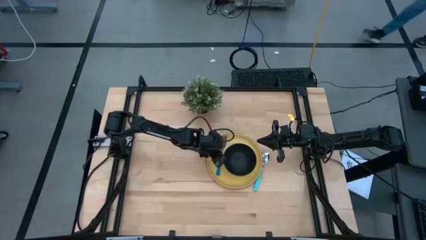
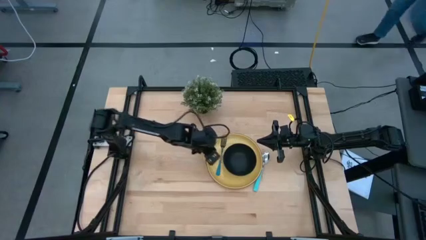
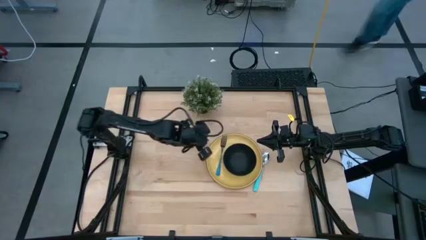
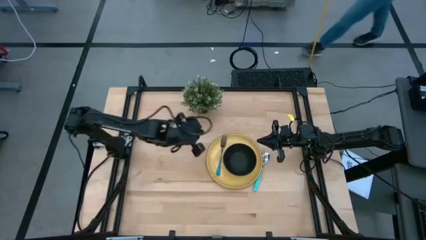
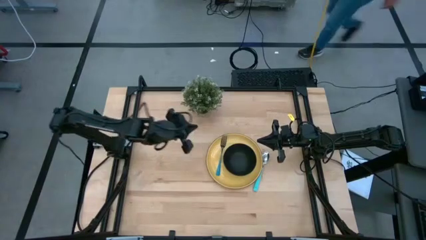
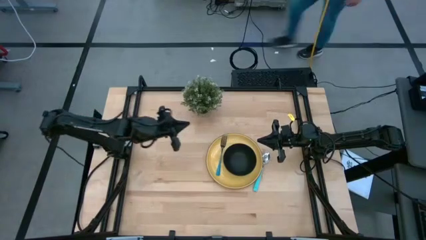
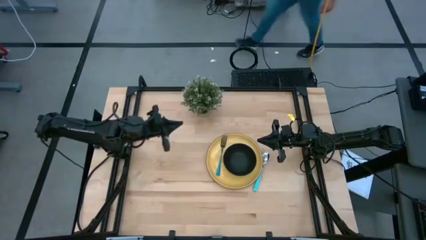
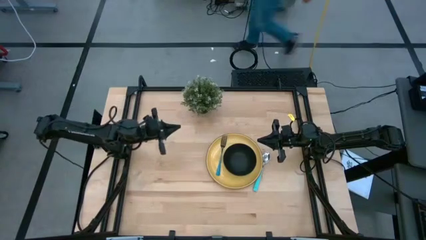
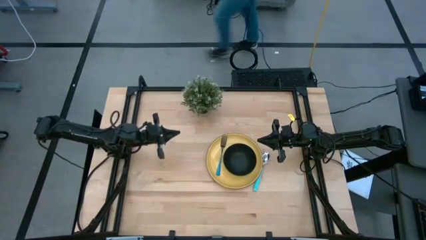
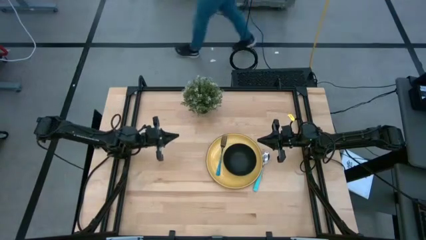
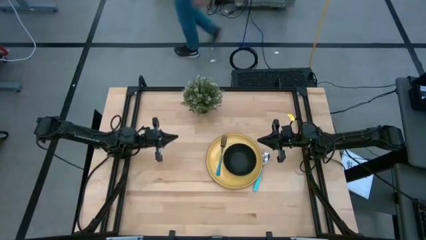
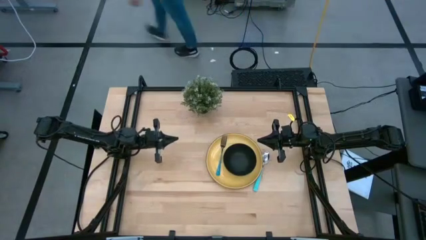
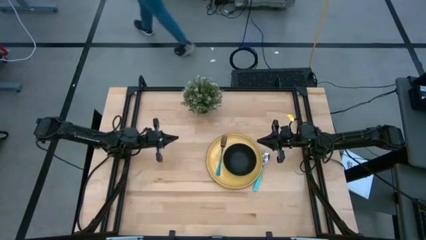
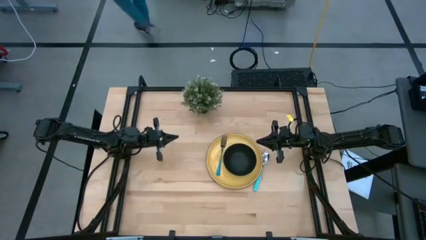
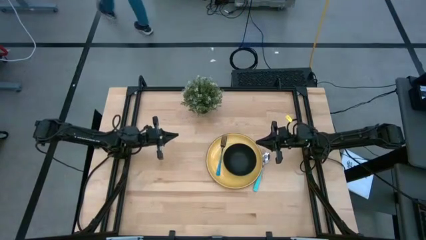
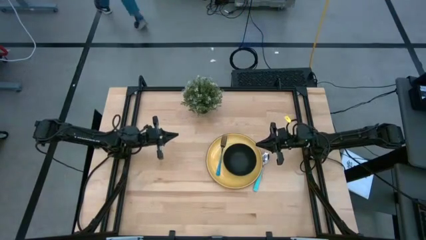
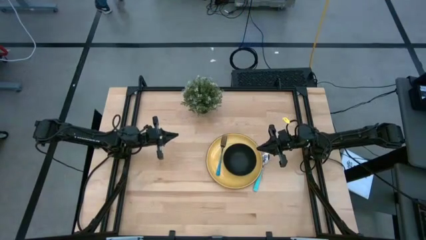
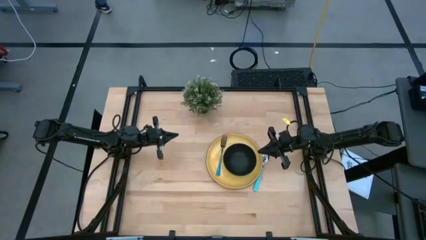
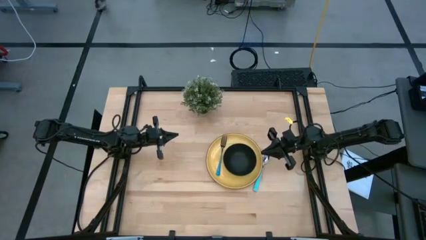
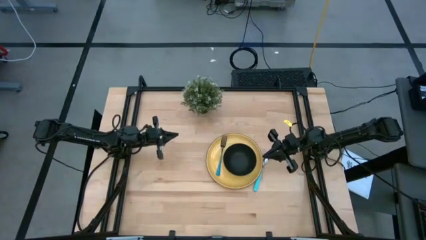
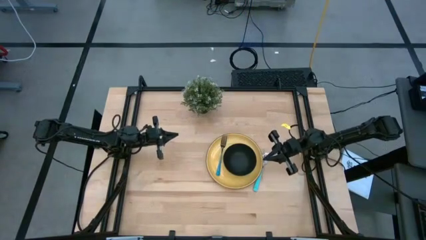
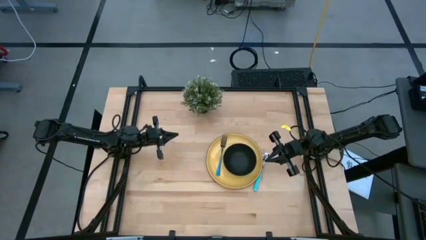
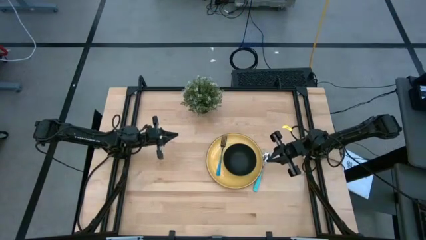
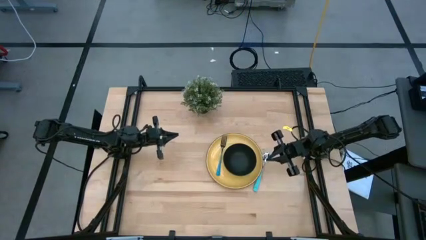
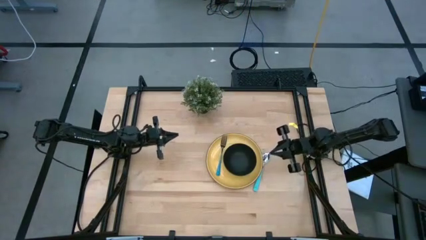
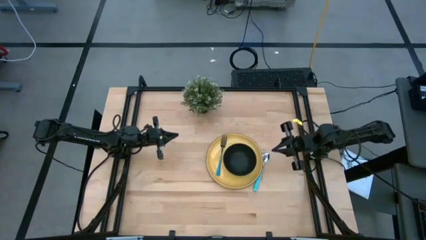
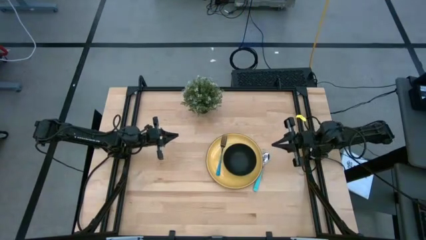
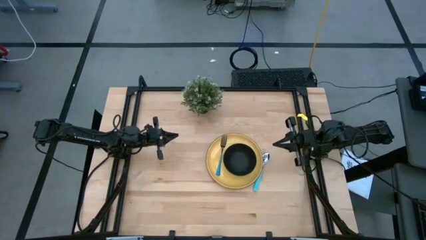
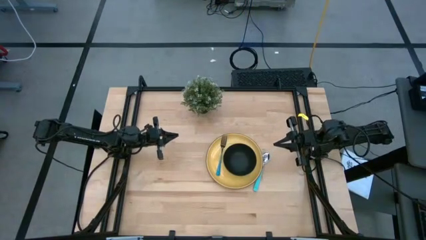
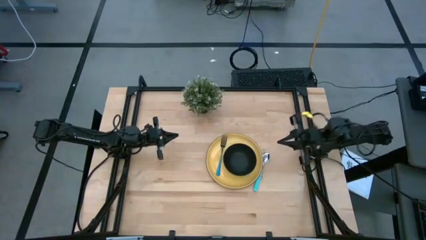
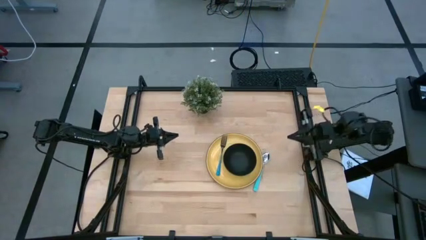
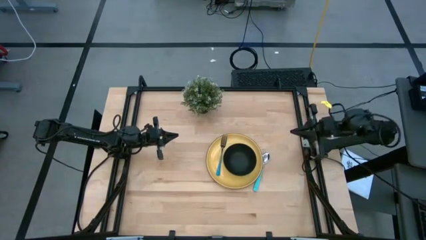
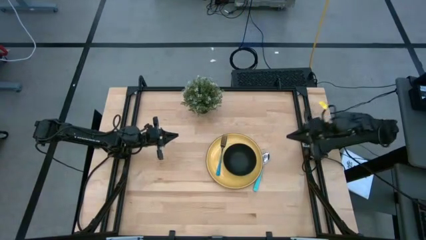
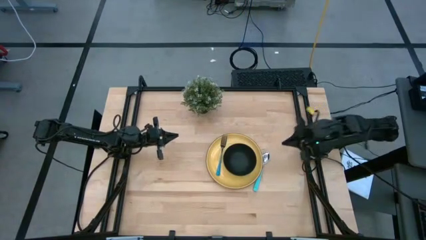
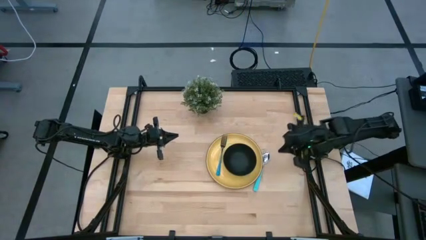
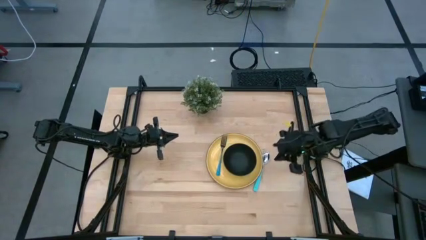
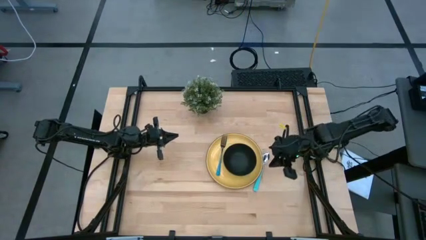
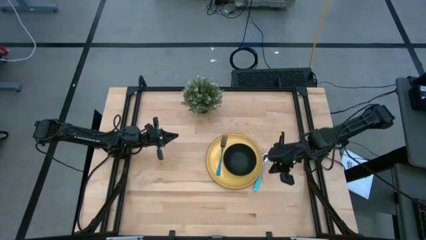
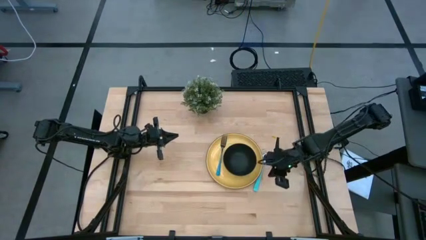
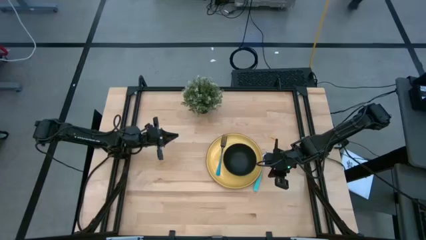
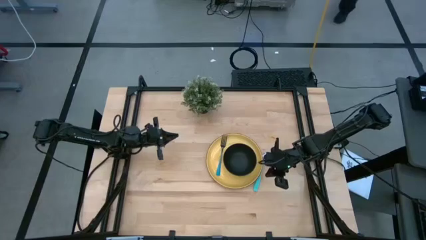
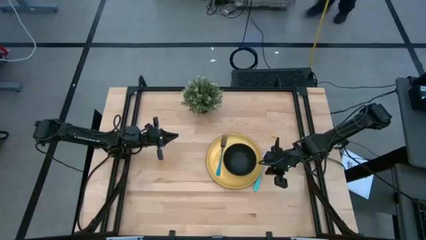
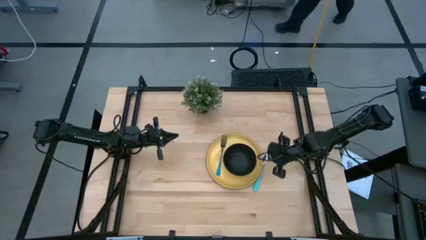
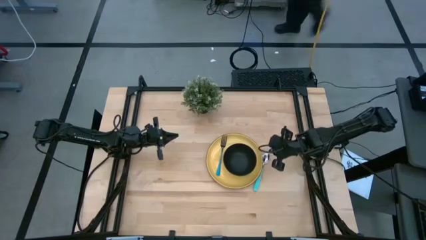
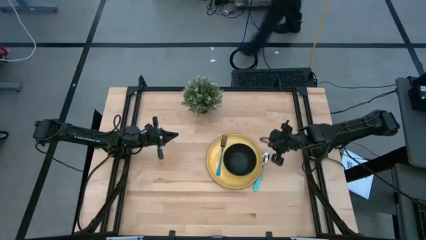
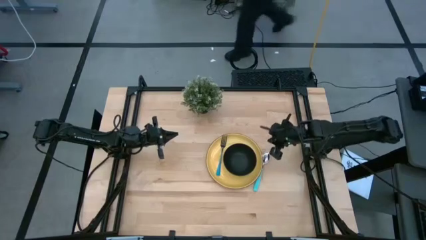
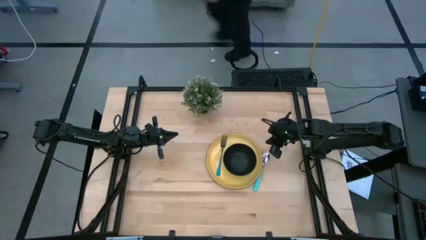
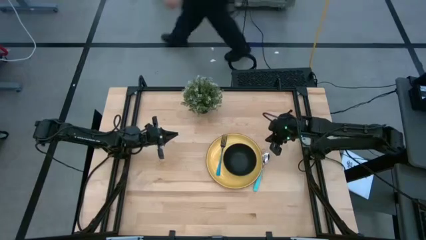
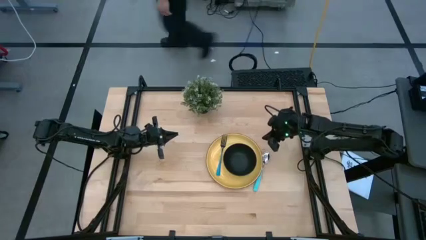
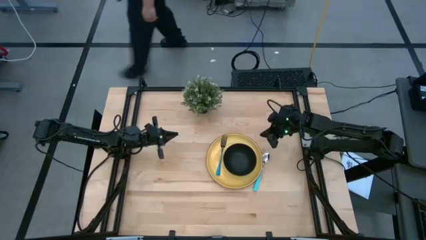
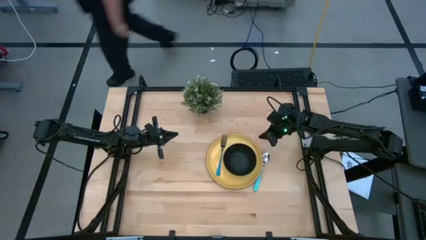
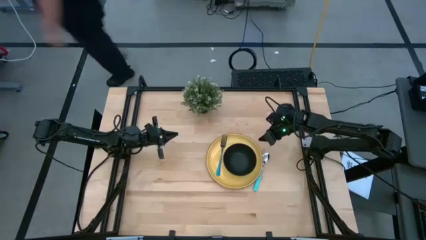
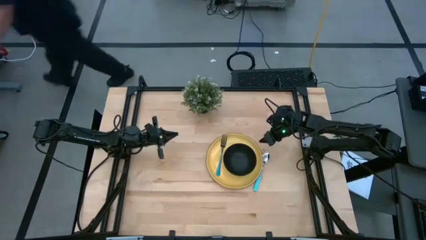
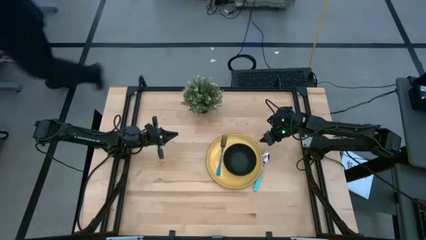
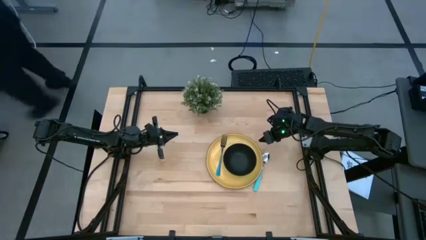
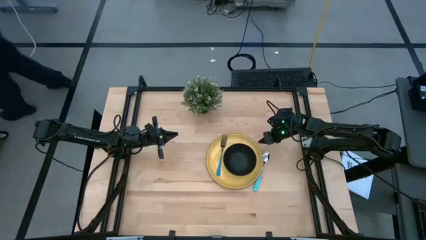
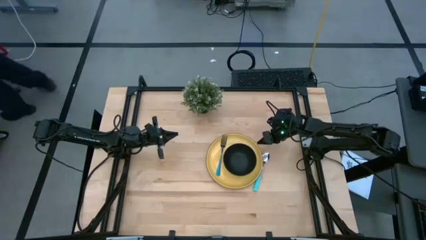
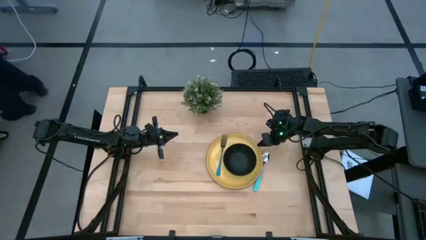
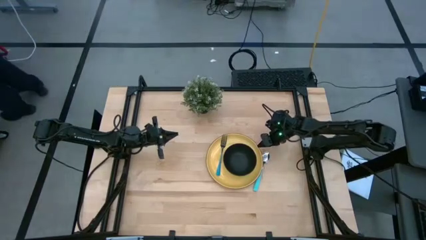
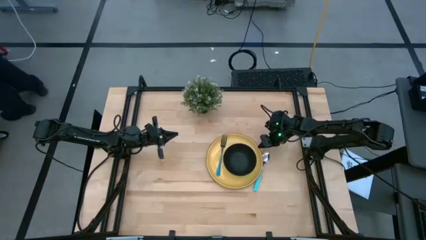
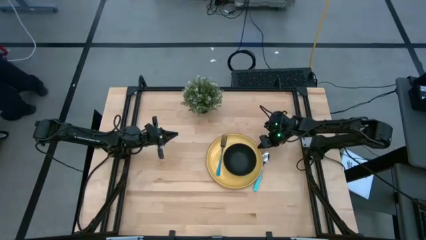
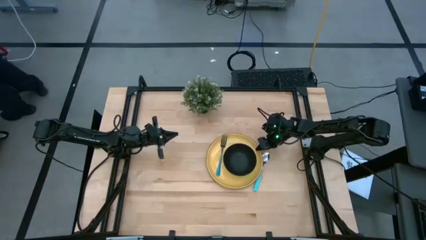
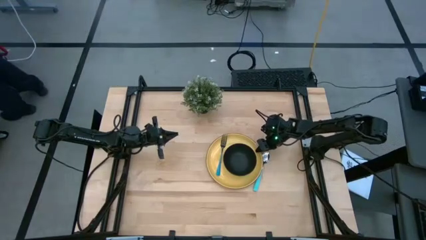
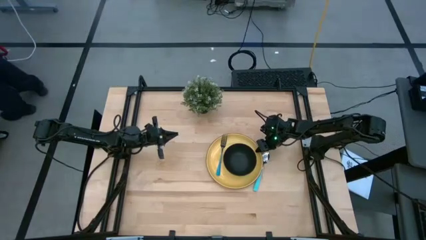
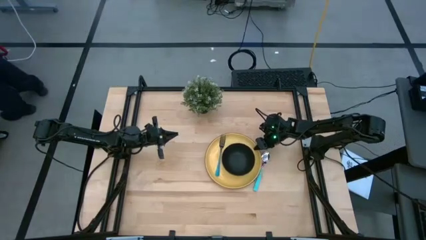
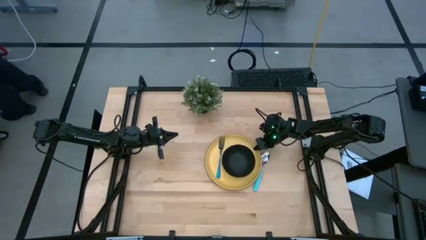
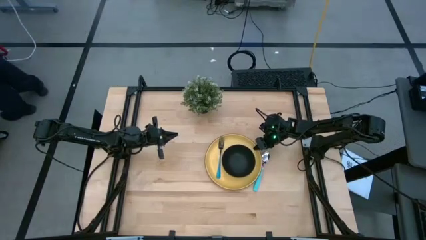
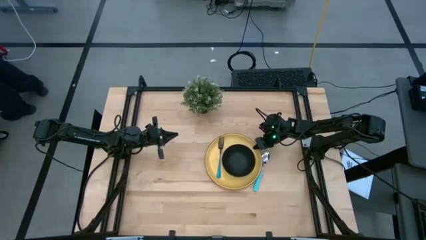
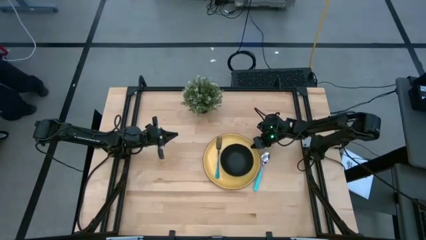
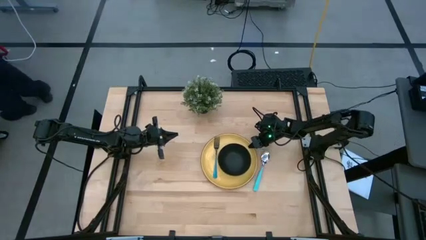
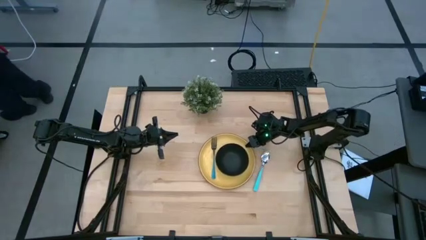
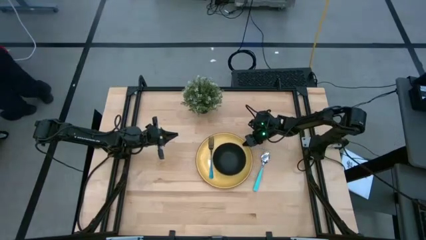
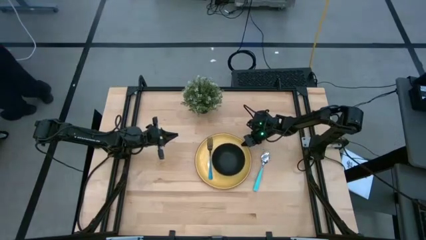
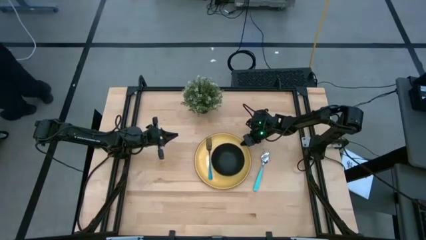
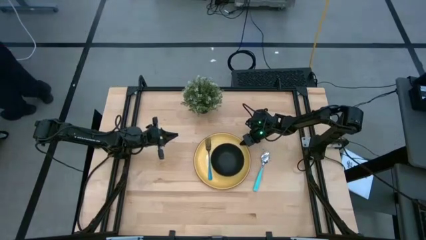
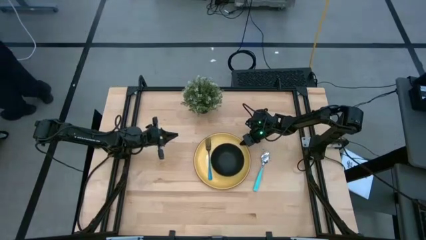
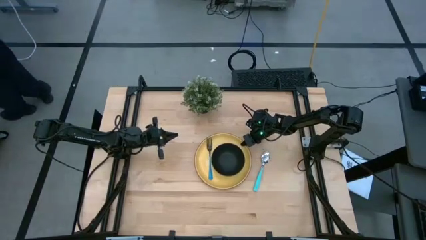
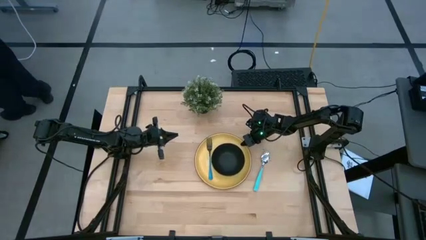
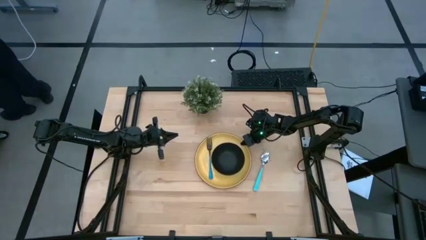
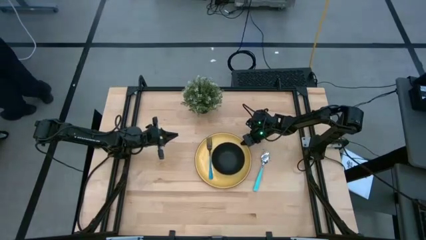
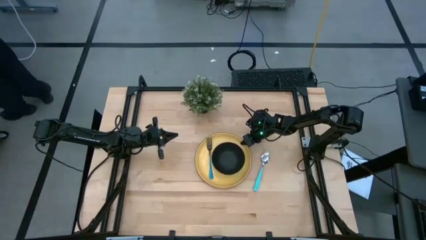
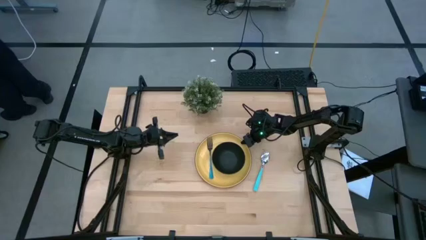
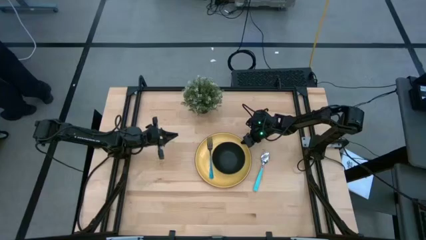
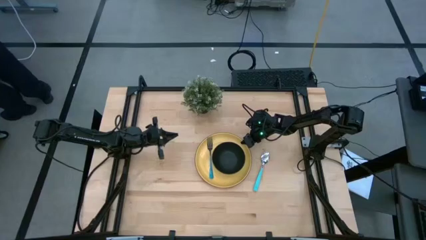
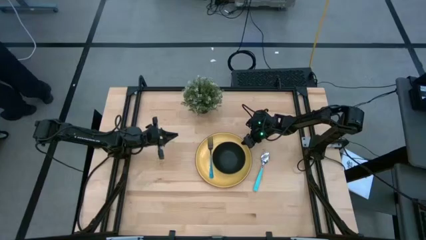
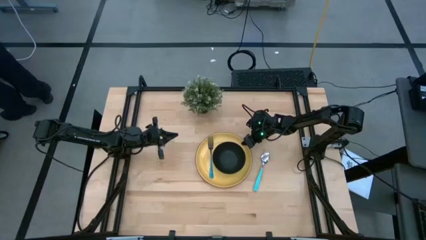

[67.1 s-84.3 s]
Task: Set table place
Adjust the yellow plate
